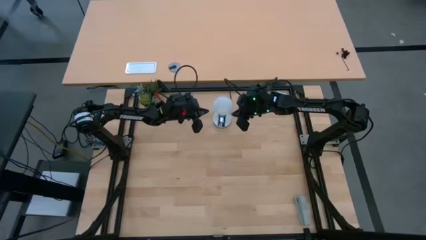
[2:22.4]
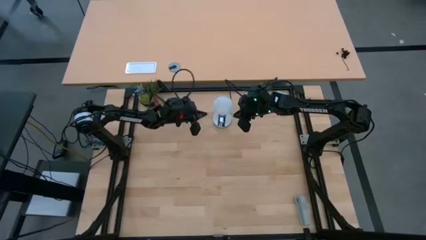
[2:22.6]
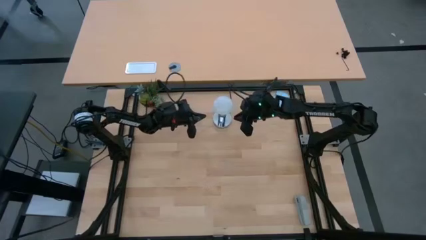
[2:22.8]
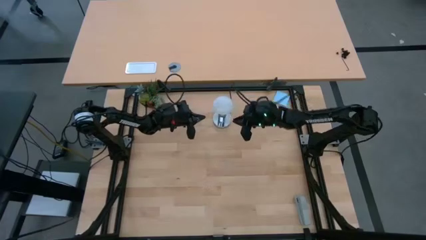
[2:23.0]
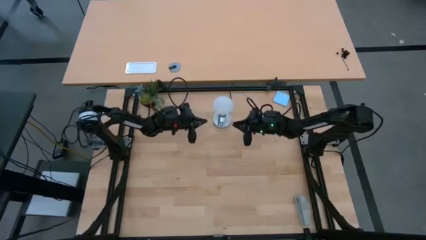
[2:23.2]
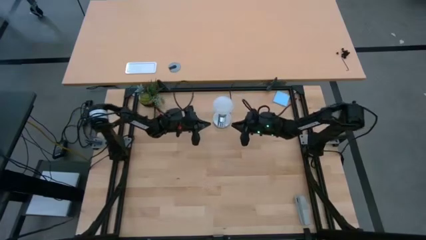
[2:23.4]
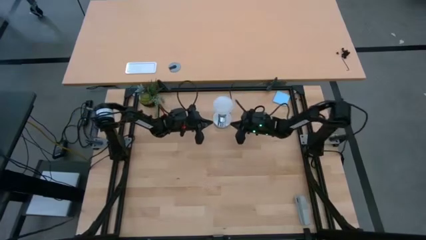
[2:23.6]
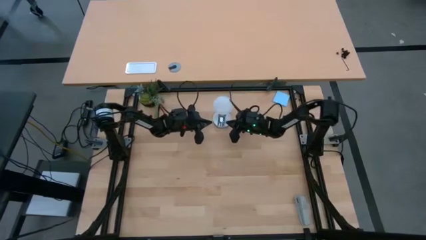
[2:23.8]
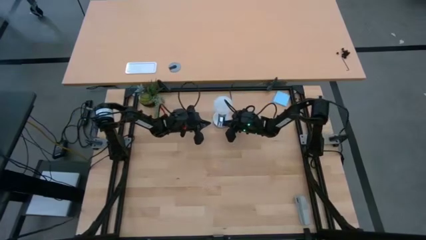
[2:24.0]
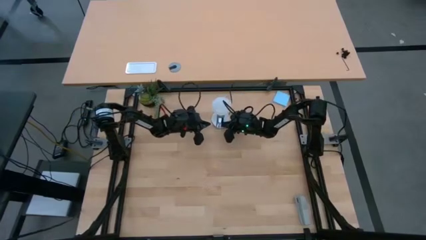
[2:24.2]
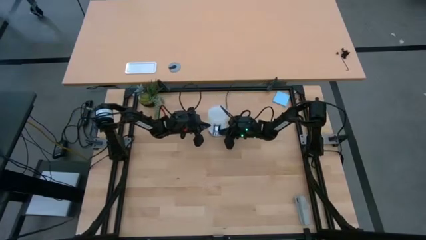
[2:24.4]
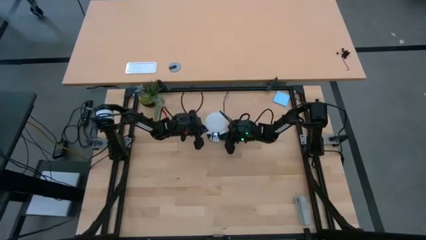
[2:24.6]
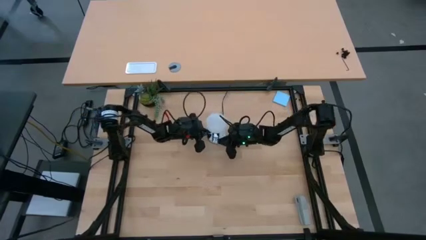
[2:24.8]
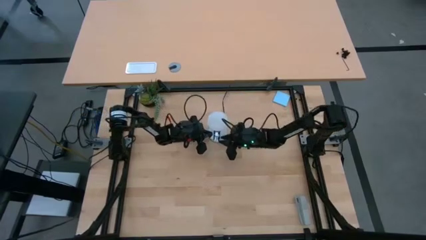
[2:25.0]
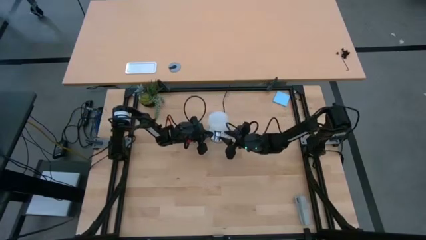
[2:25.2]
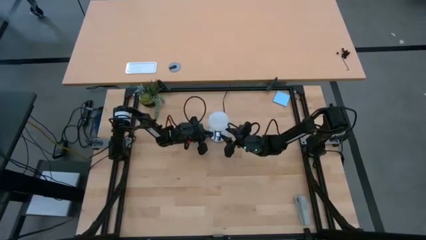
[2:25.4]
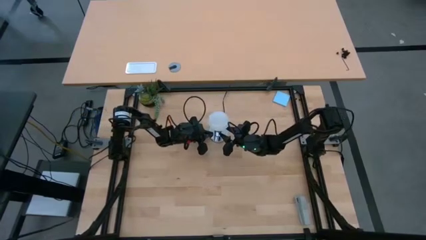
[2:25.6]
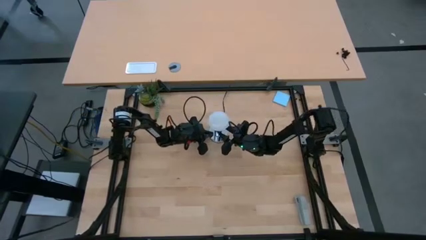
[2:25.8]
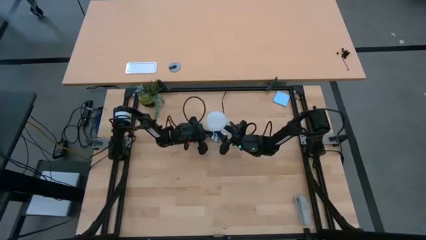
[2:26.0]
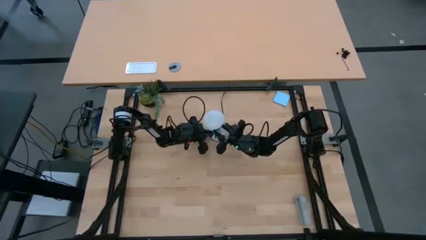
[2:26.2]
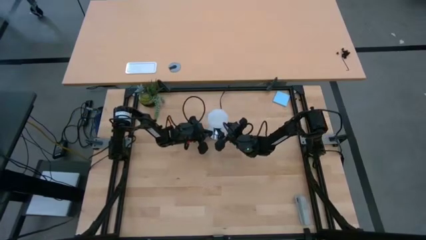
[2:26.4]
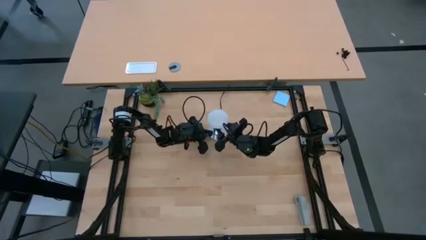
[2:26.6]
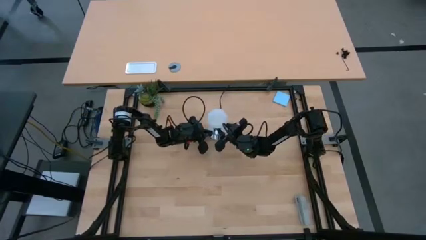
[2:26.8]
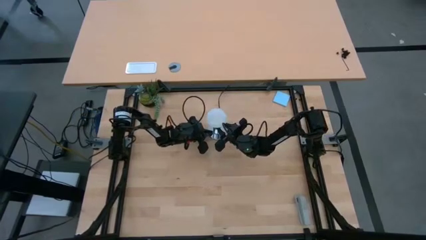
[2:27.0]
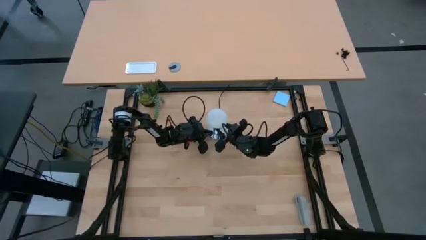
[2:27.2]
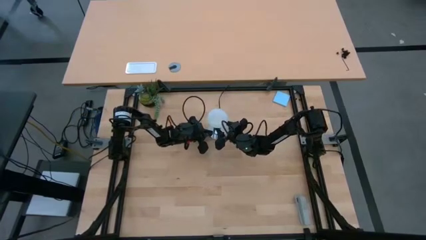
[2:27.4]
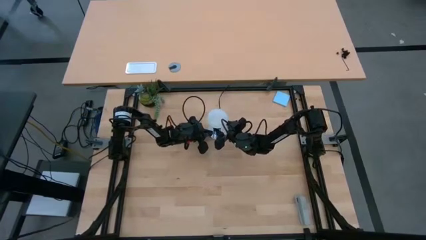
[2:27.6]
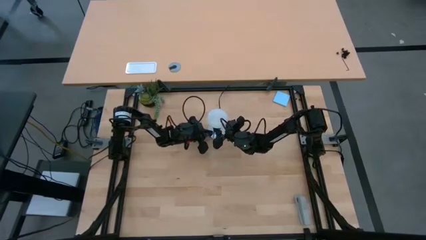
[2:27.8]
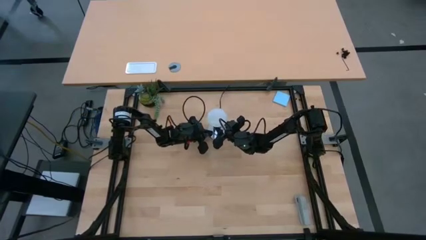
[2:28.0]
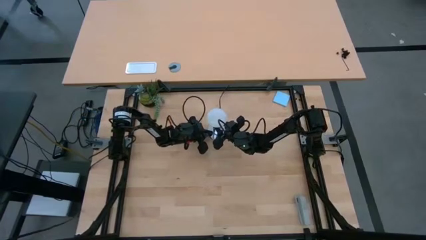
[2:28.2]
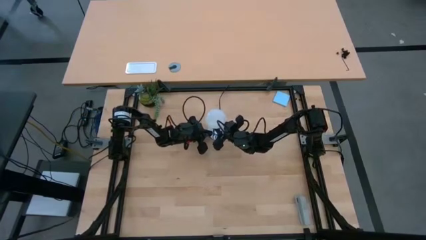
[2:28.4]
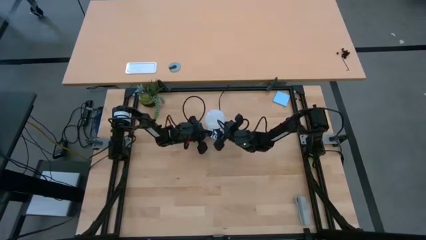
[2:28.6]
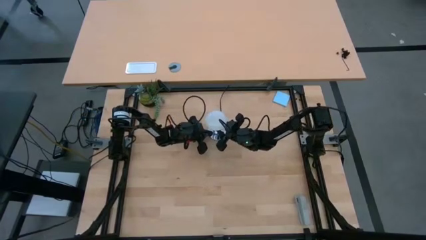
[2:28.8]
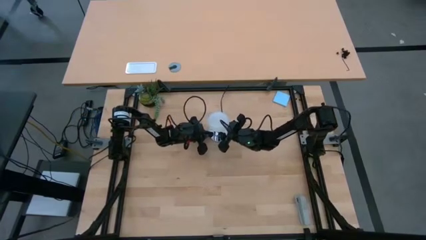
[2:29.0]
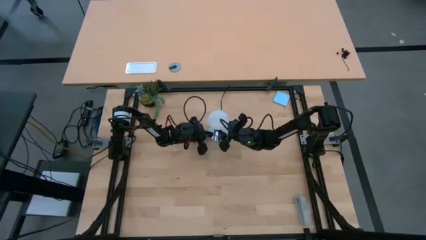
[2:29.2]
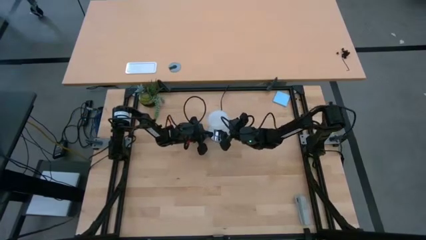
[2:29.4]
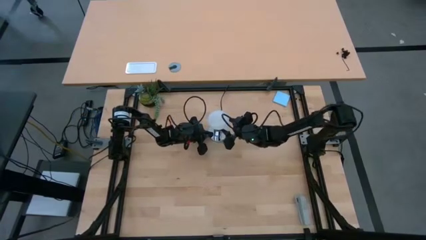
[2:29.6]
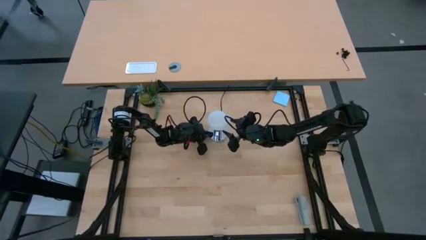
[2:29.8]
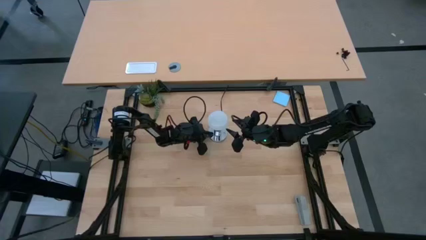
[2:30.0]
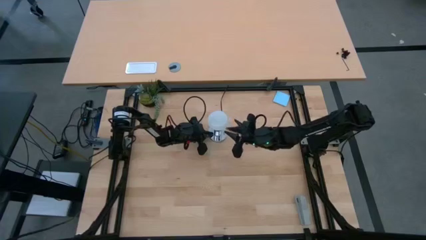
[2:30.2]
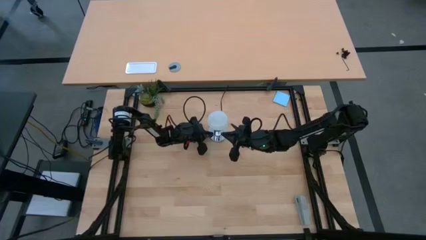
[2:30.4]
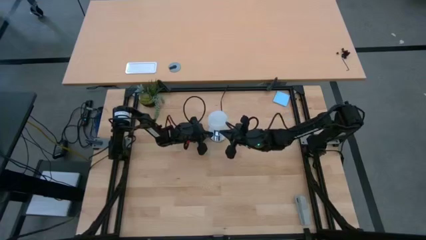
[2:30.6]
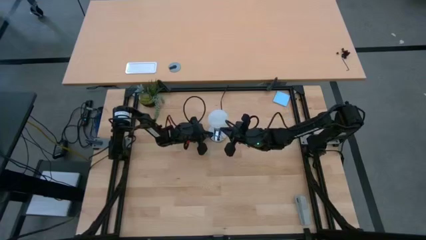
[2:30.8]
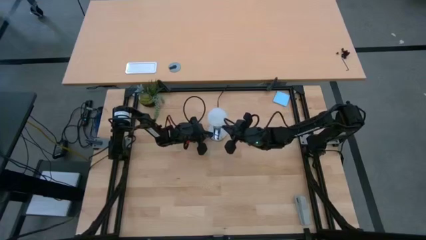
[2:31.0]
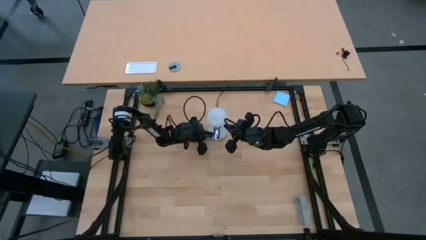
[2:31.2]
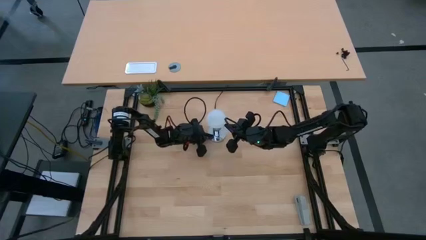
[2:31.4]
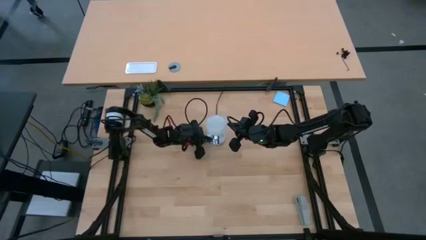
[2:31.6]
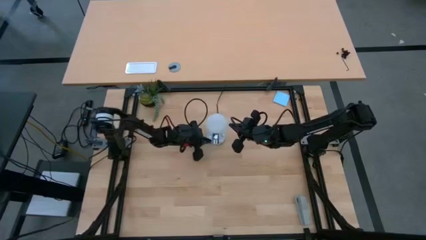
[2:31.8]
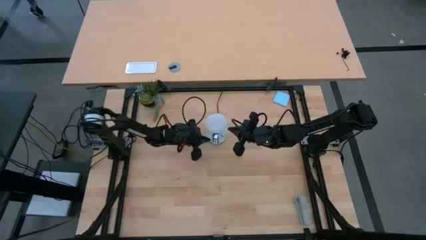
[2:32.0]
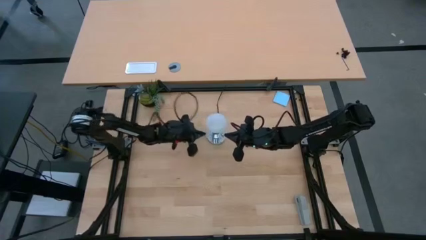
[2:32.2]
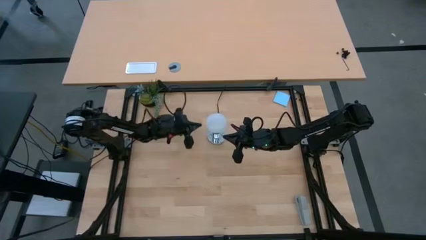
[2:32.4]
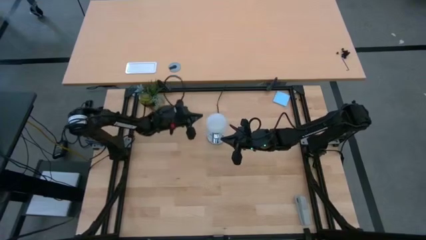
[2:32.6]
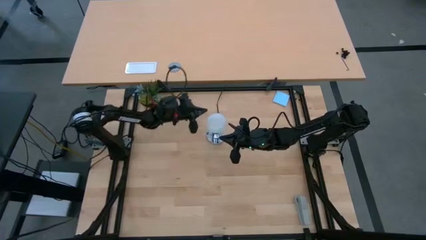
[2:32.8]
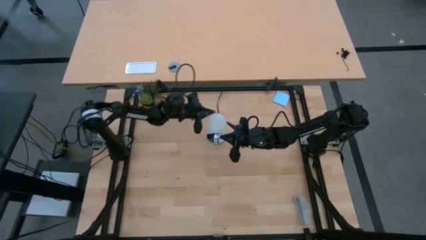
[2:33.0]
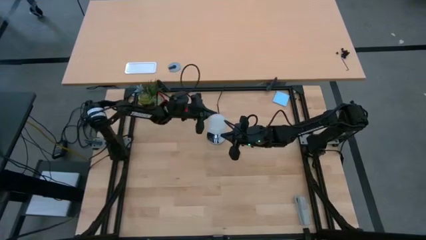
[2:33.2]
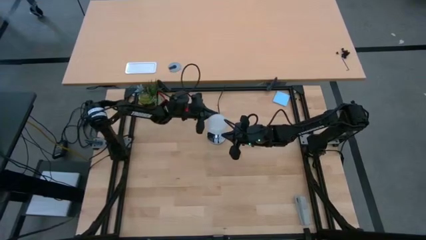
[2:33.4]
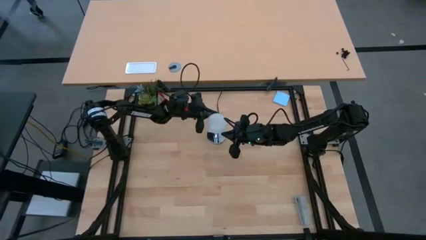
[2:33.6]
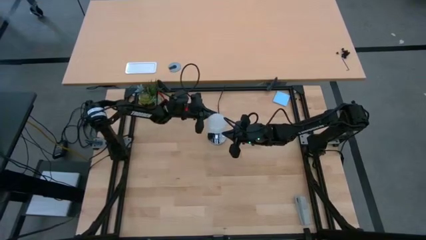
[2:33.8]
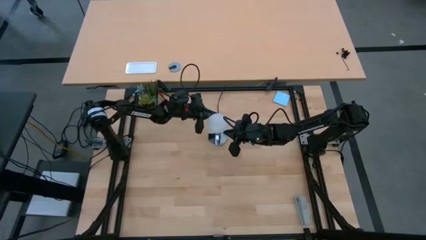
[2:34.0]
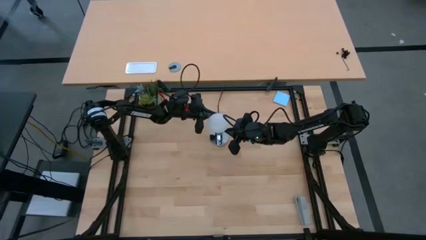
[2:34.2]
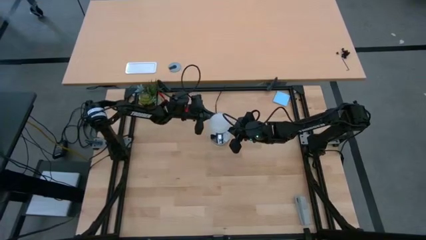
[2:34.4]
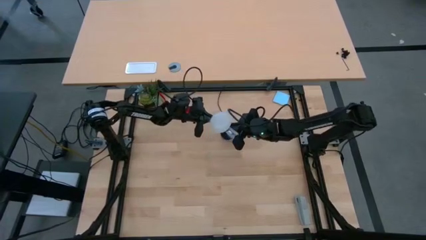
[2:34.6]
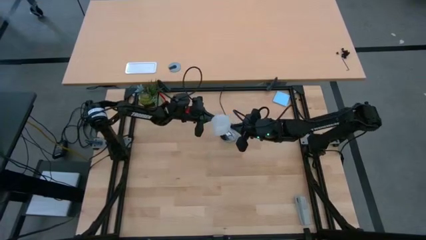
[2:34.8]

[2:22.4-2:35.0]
Task: Screw lightbulb
Remove the white lightbulb from the desk lamp

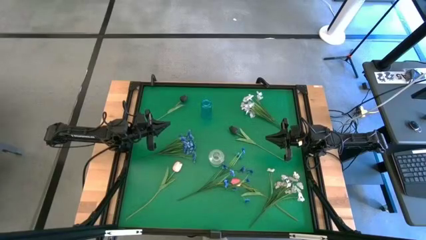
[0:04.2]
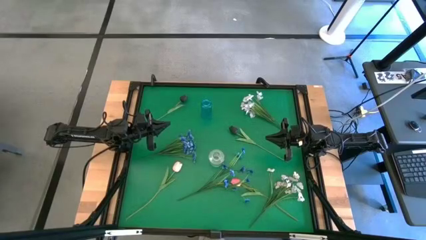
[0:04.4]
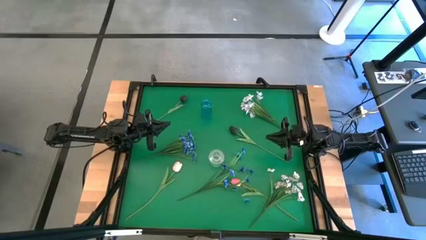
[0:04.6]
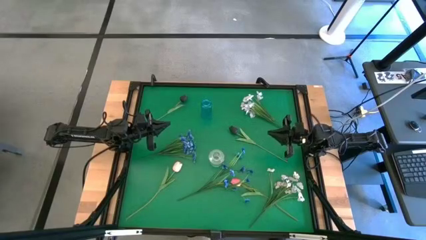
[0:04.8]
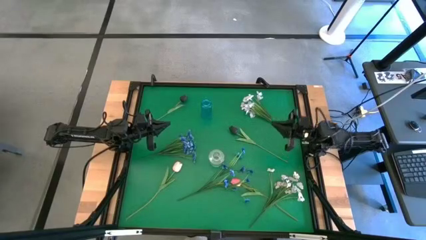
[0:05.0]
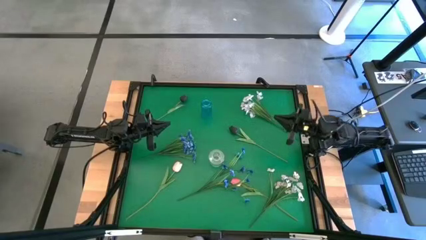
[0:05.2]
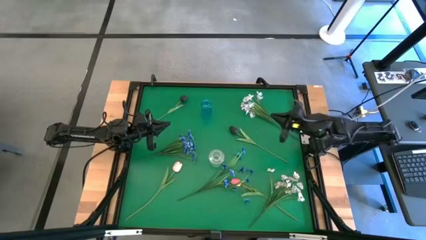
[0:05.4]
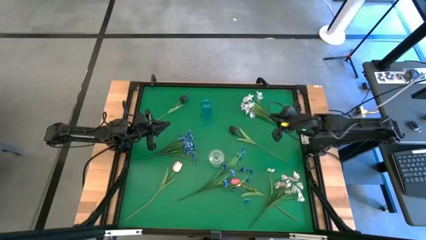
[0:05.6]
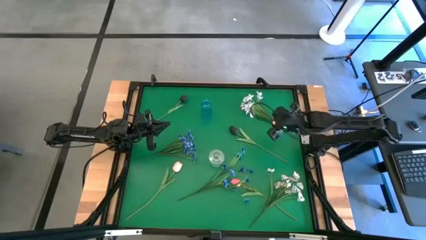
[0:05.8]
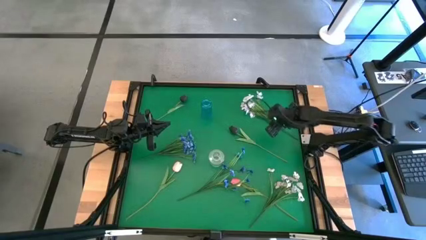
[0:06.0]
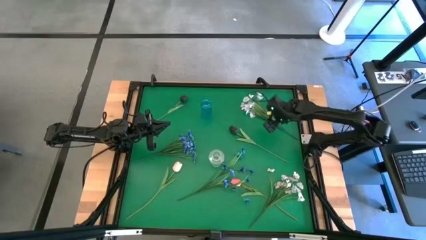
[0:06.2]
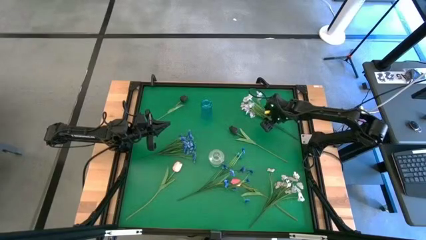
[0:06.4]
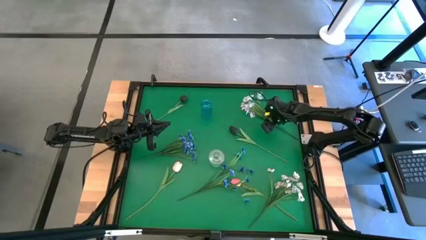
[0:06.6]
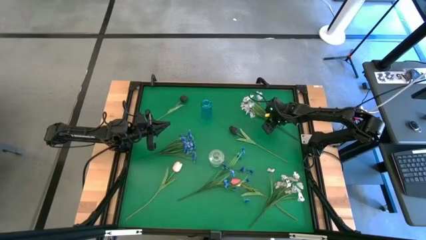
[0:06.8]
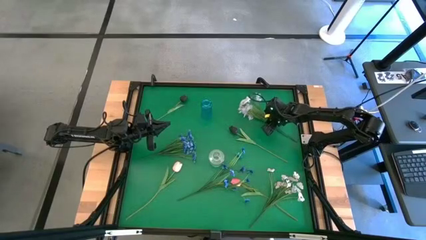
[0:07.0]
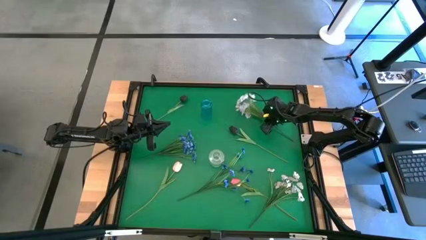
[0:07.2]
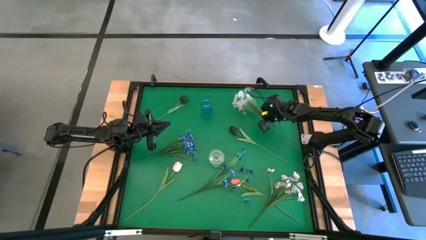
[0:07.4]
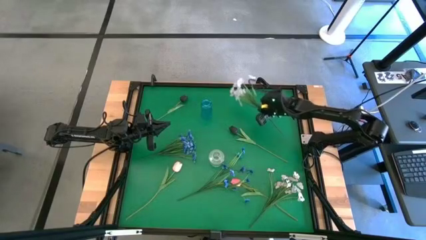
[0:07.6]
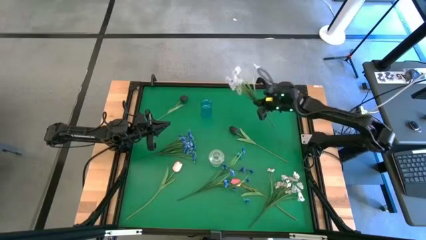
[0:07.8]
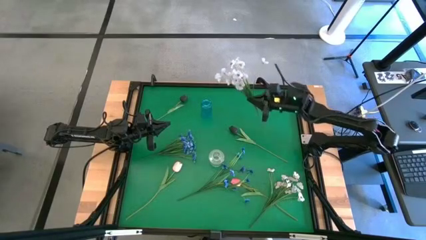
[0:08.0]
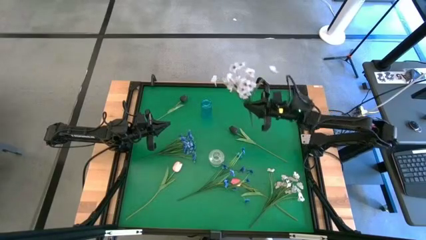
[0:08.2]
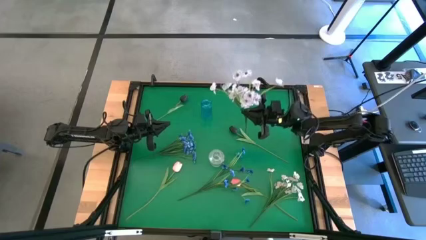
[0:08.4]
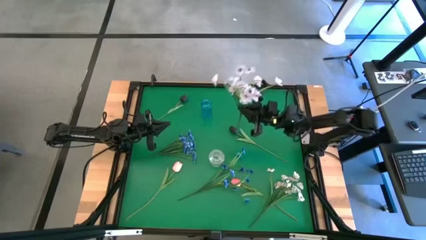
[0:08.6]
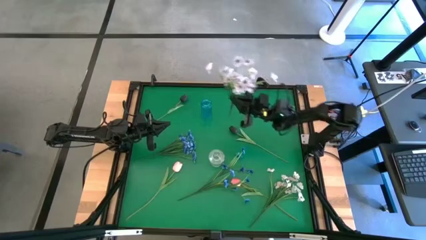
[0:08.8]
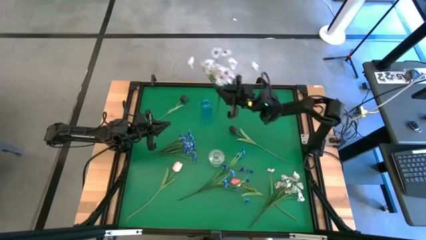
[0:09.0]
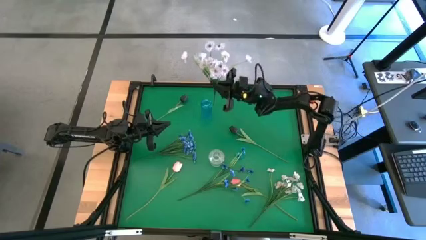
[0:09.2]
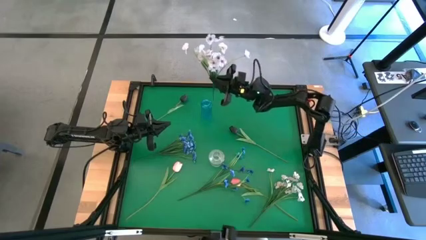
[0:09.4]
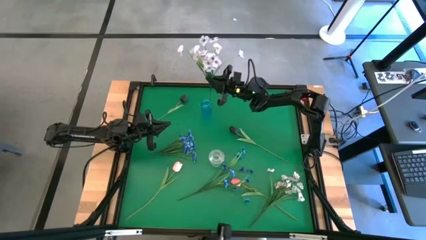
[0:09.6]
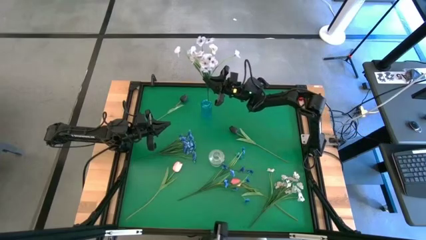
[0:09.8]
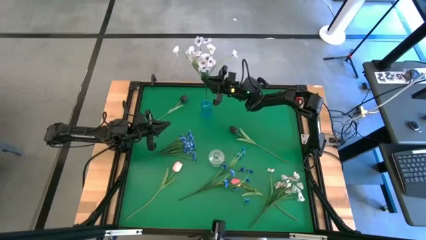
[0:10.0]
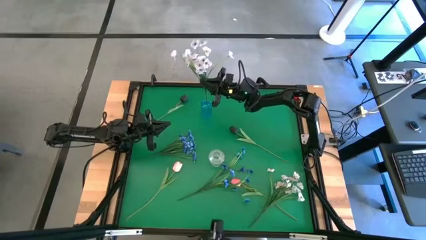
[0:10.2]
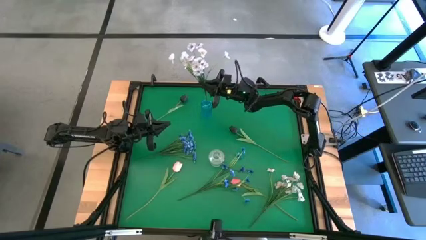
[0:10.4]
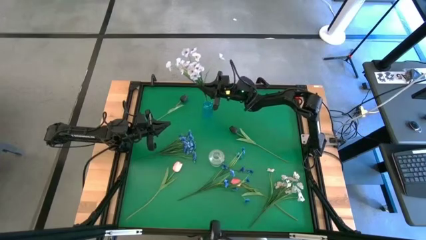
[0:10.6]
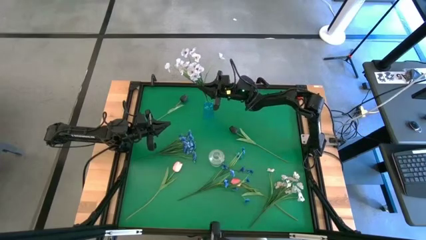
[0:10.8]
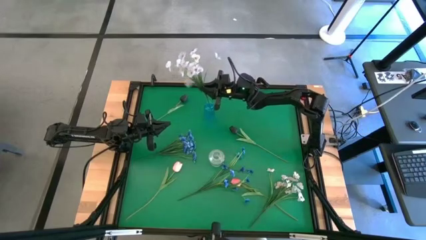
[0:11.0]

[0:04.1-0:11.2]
Task: Sort flowers into vase by color
Put the top white flowers into the blue vase
